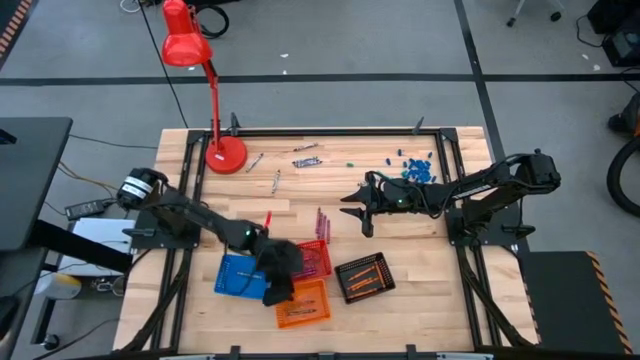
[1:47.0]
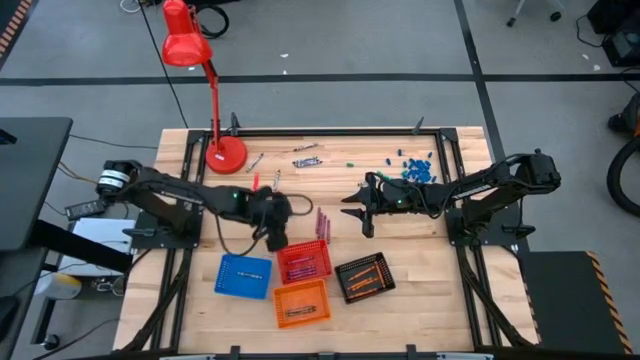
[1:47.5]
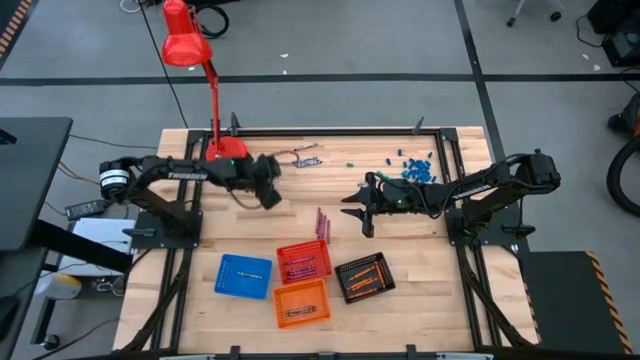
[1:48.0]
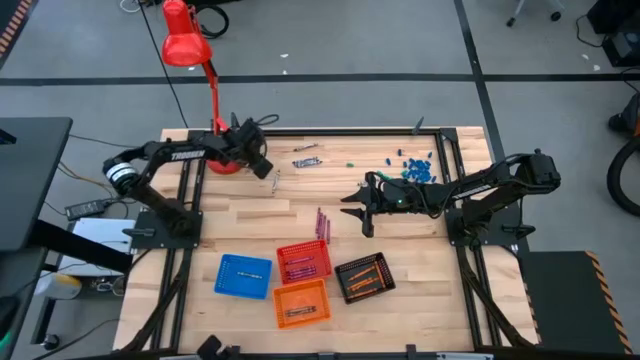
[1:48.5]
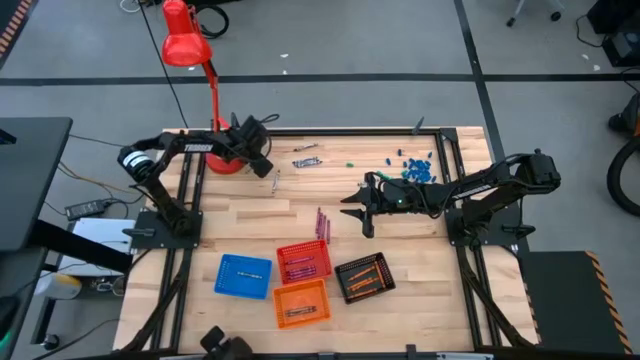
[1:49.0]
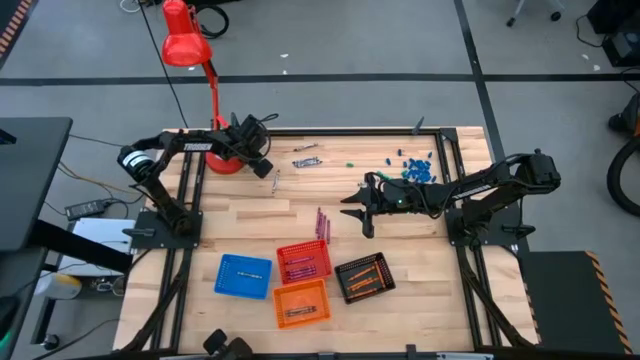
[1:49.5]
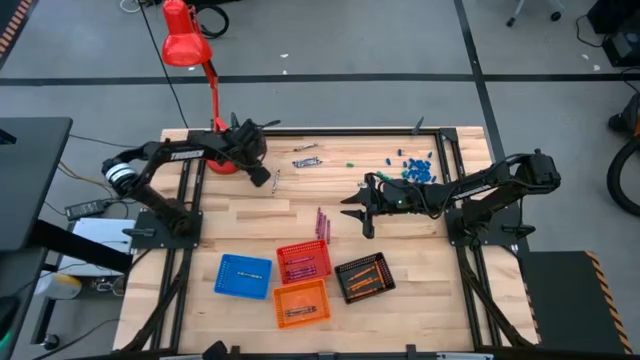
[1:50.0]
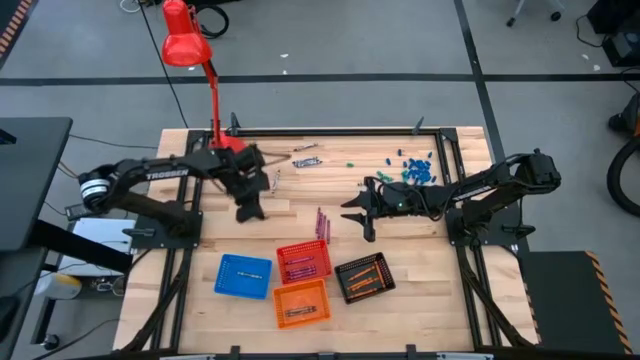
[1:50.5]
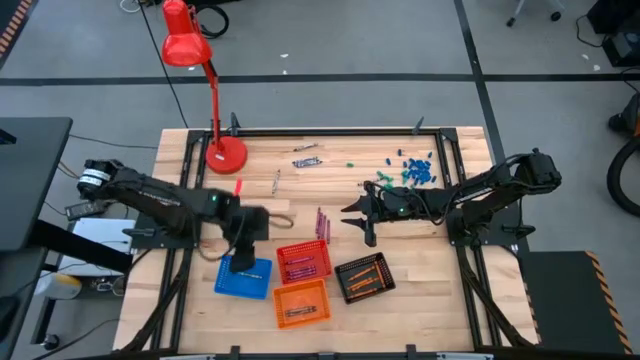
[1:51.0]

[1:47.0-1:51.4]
Task: Sort crayons
Put the black crayon into the blue bin

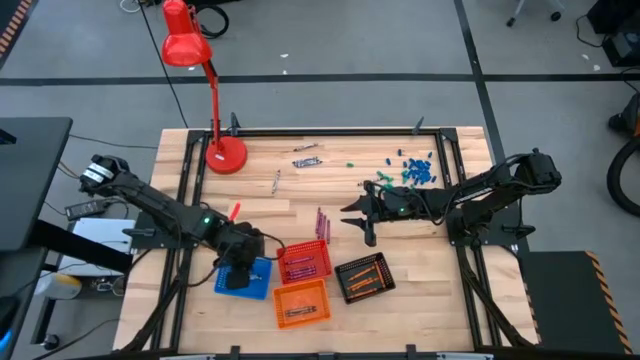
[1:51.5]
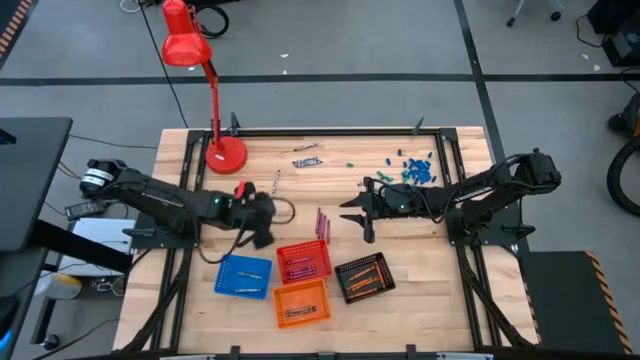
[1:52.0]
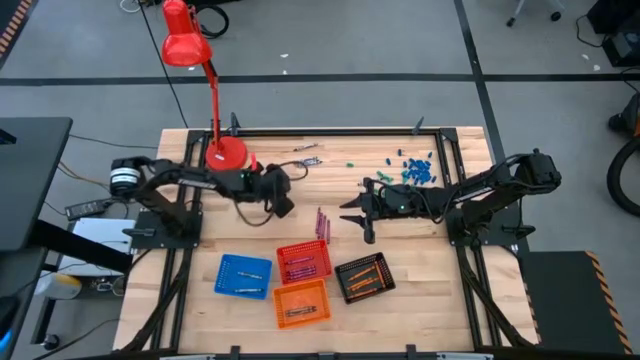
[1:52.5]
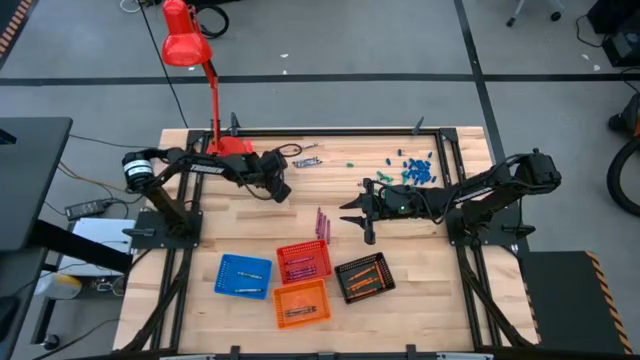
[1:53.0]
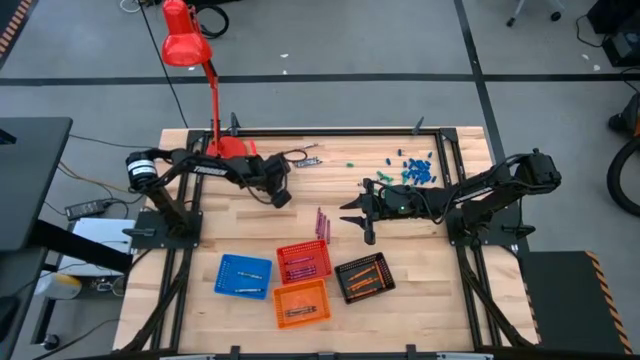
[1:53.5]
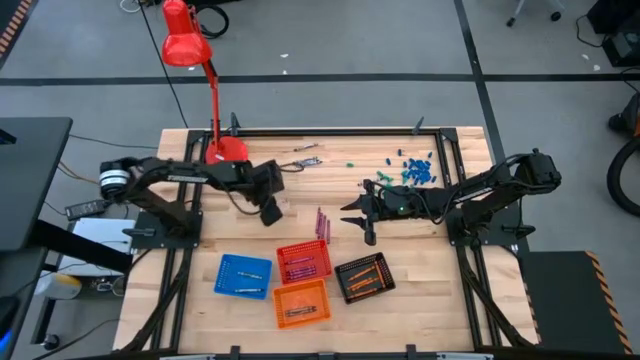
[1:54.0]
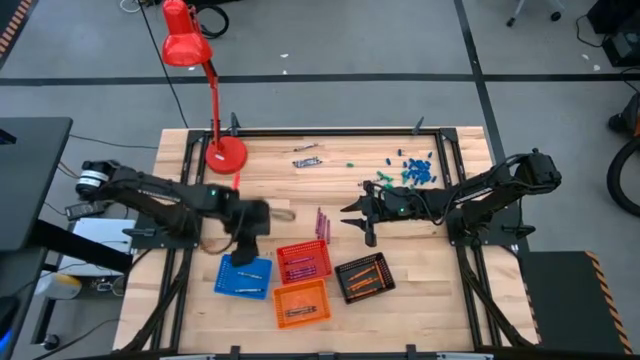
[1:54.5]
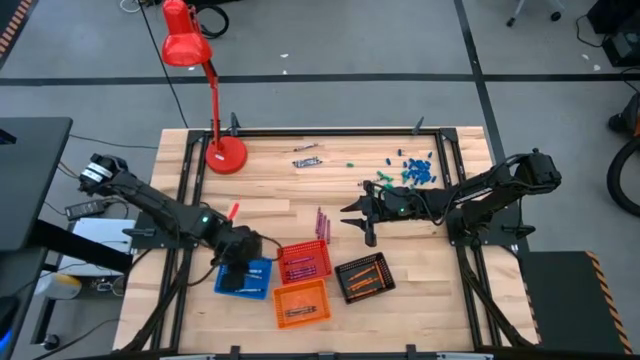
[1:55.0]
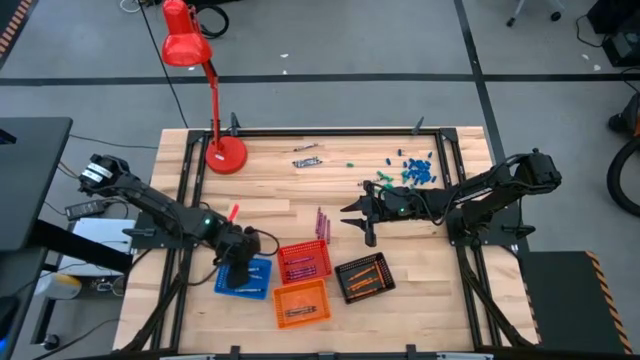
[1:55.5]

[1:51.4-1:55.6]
Put the black crayon into the blue bin

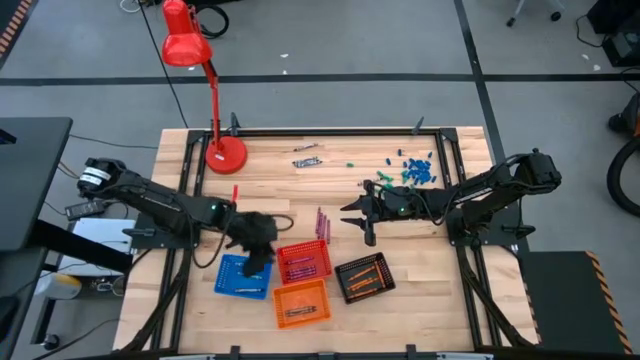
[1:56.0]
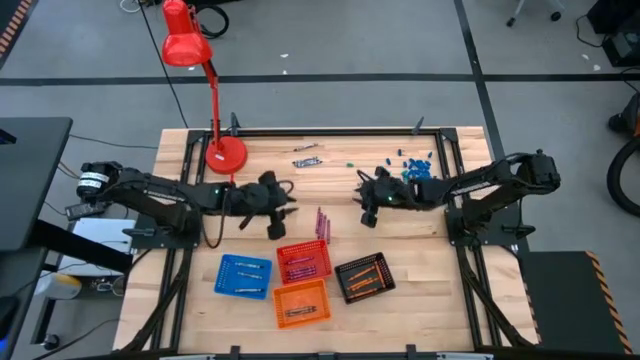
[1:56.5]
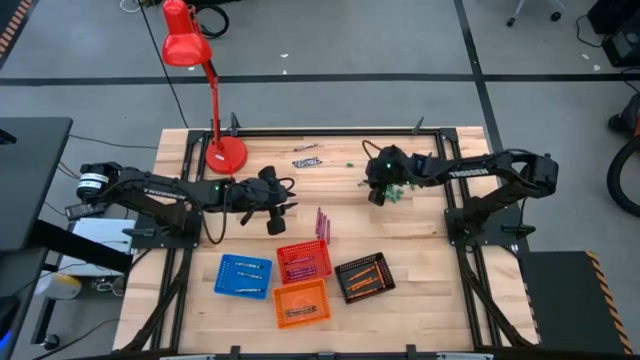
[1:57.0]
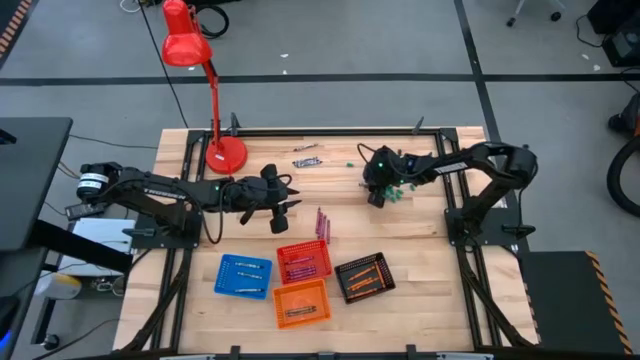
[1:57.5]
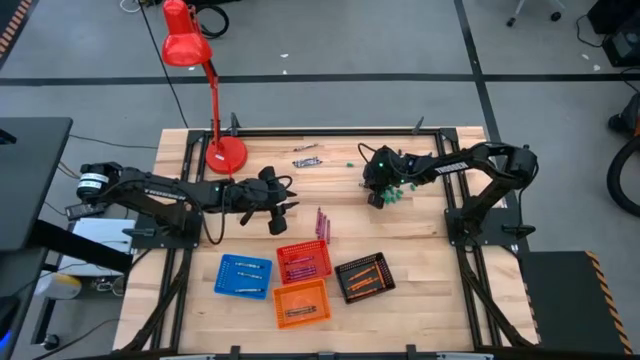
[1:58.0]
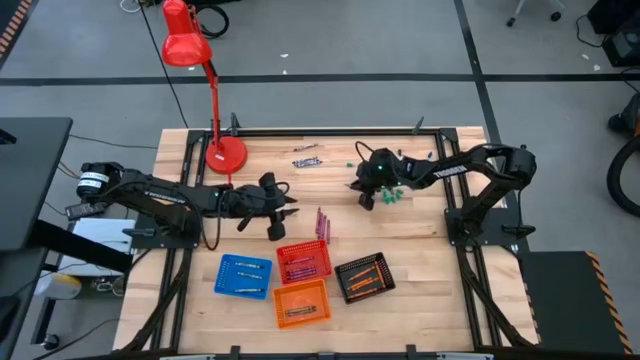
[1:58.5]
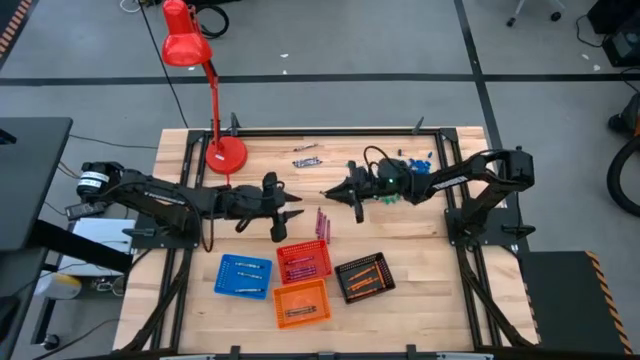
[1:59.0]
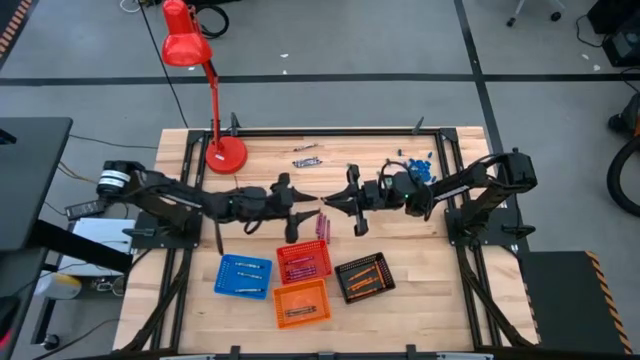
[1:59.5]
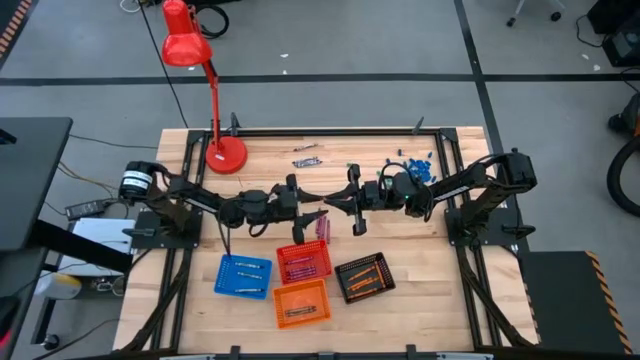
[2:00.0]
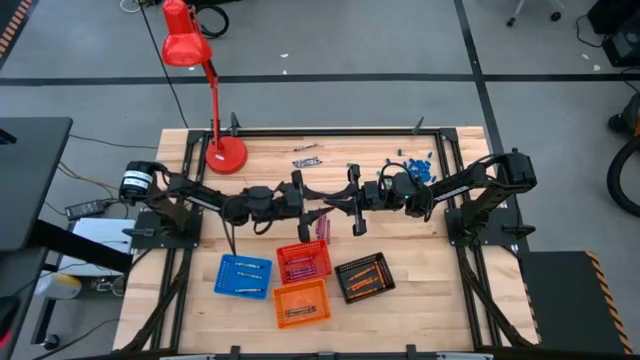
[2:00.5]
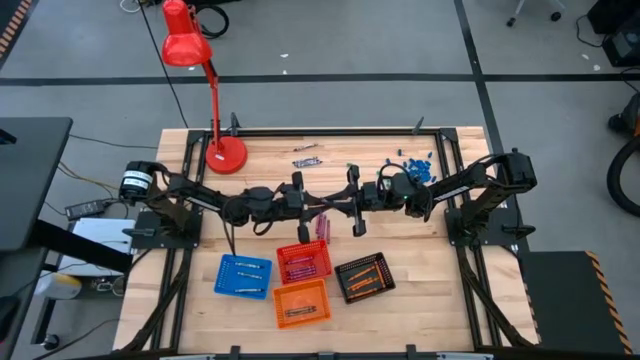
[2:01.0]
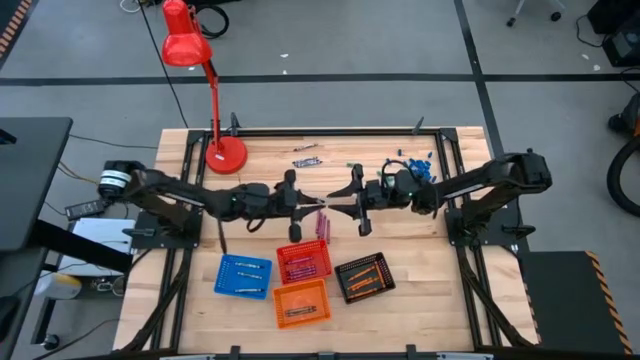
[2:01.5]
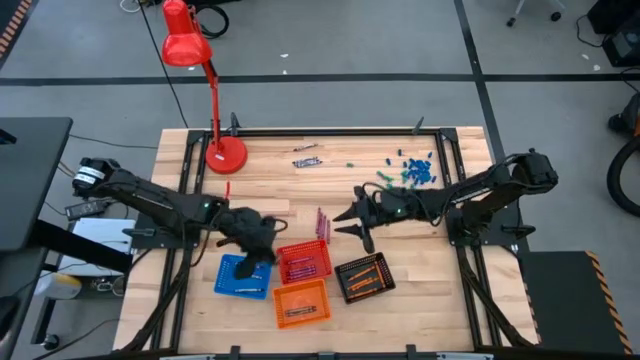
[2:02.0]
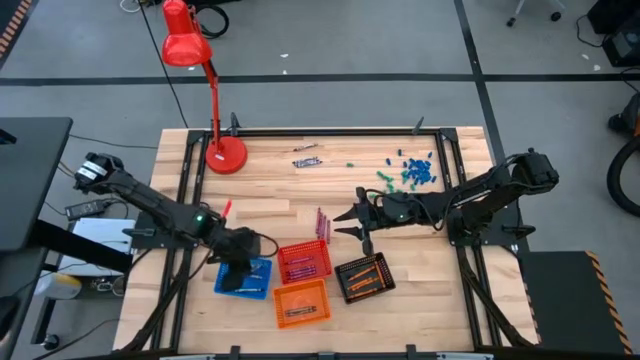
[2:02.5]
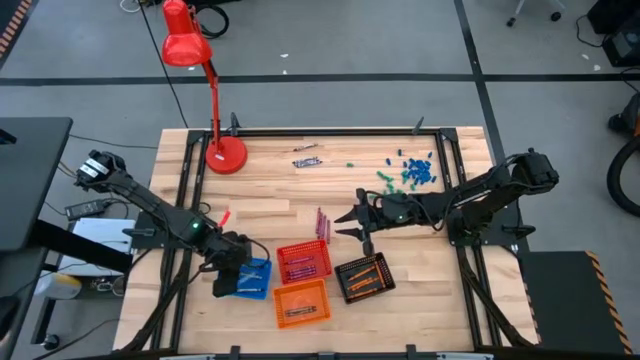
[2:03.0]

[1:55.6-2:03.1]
Put the black crayon into the blue bin

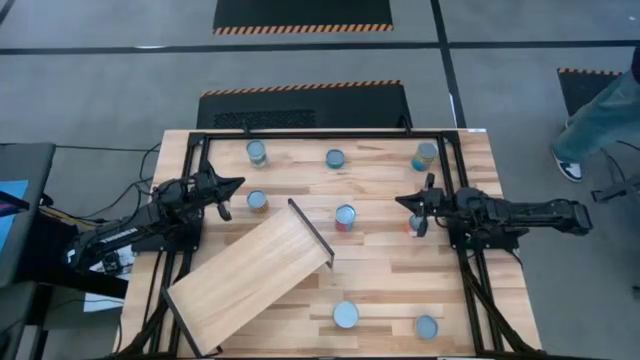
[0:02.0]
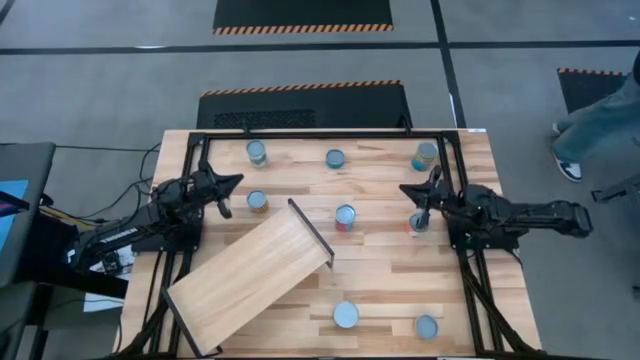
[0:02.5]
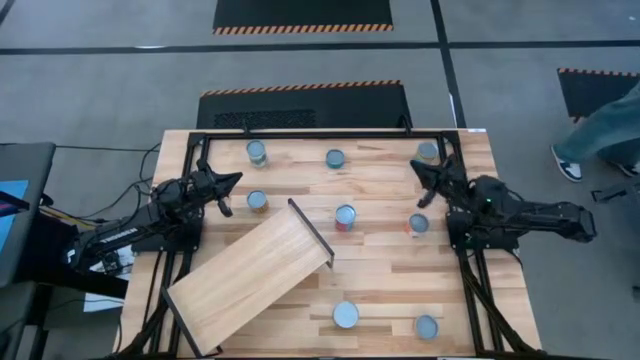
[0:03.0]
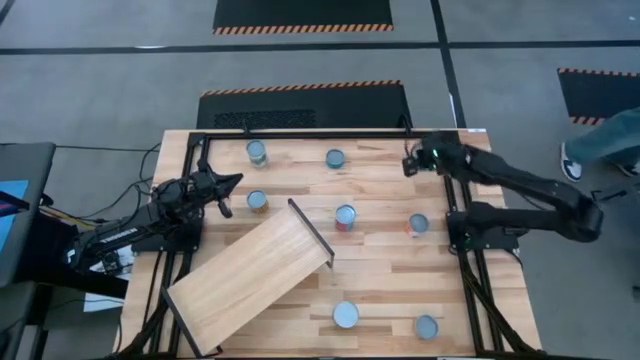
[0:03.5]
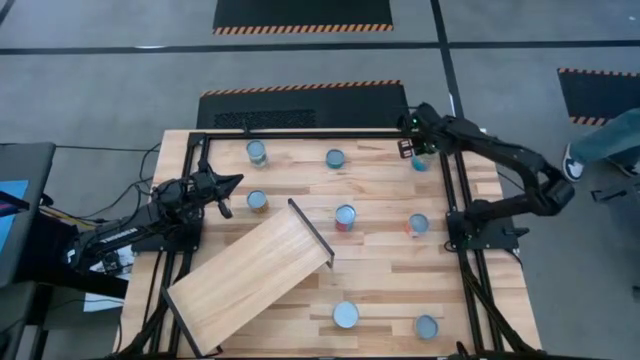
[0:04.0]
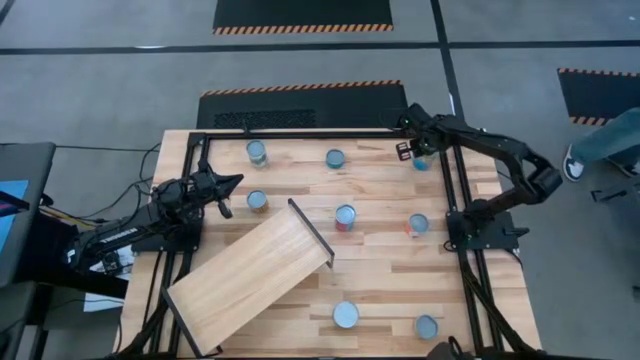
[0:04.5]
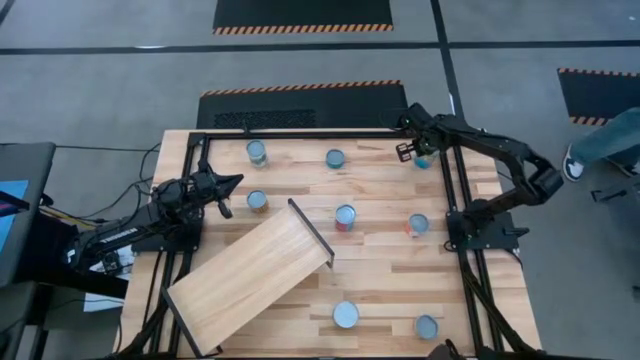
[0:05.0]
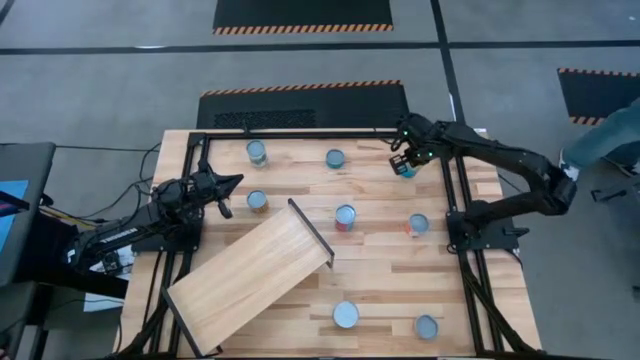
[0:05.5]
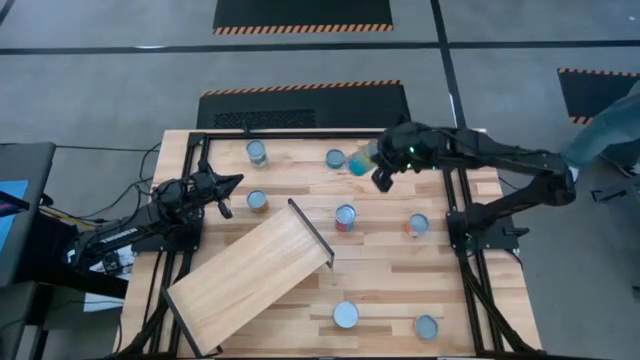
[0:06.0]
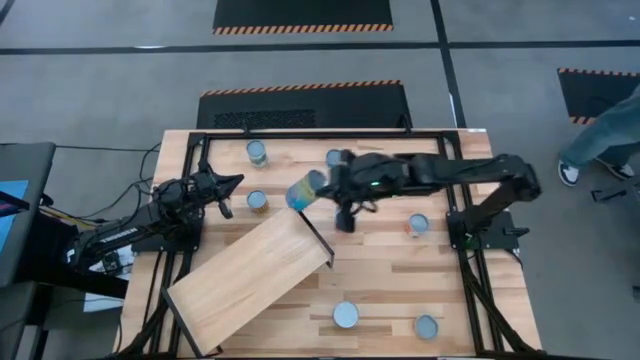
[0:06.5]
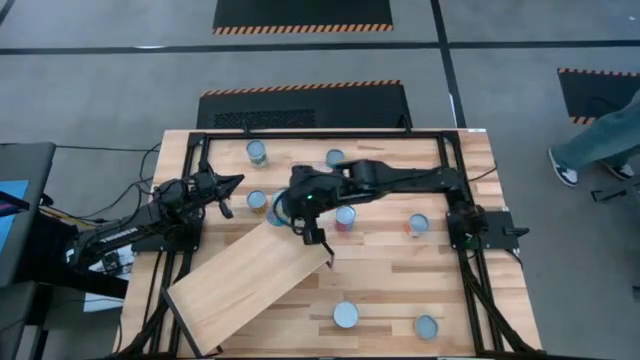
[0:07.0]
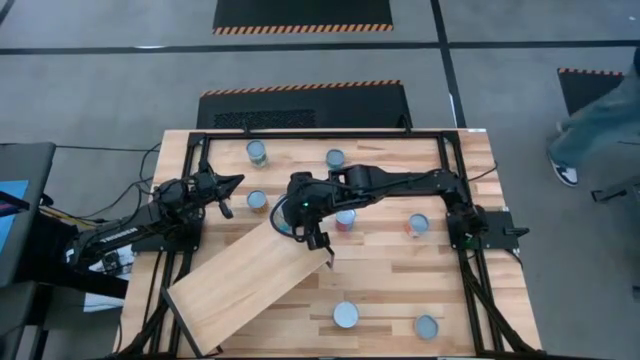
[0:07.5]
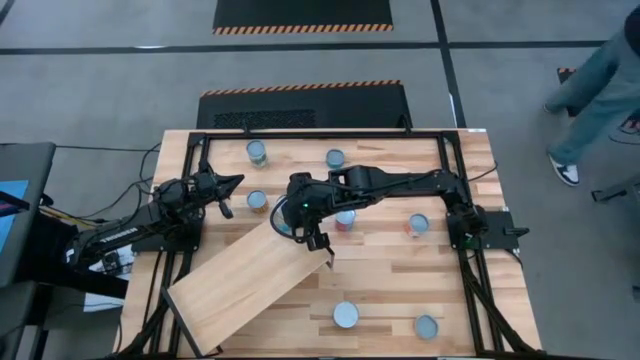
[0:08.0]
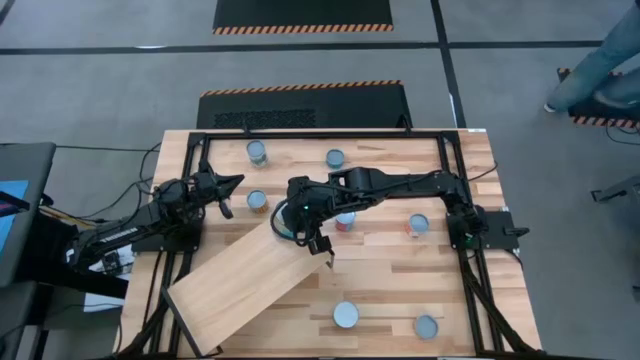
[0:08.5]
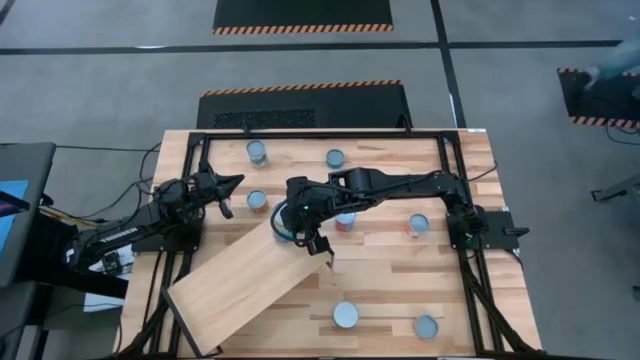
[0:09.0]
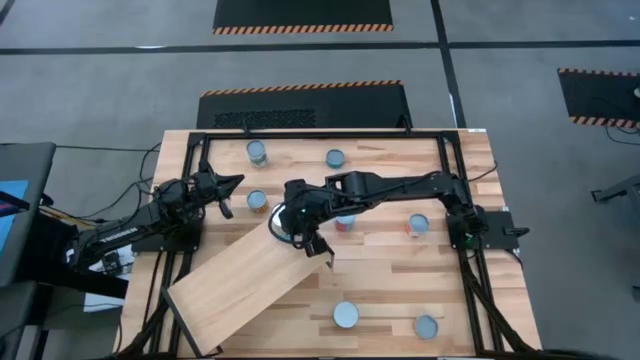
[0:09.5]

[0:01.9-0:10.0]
Task: Pick and place cans onto a shelf
Put the top canned cherries on the shelf
